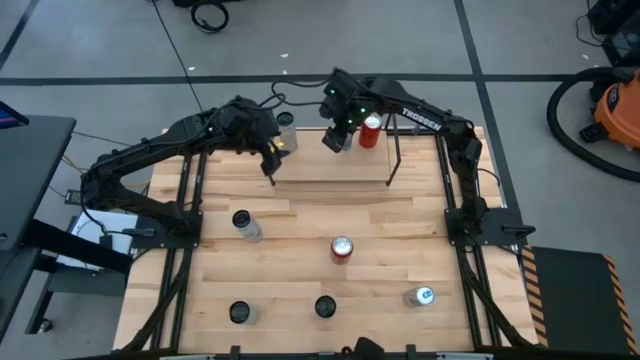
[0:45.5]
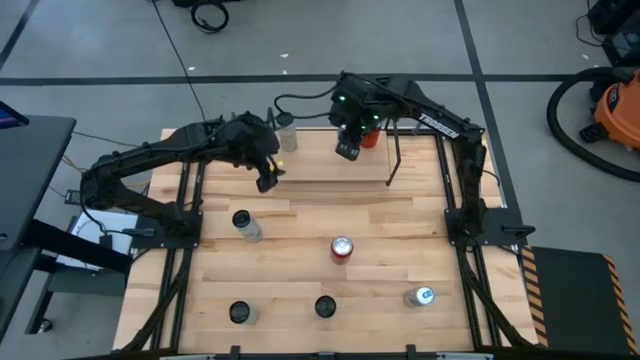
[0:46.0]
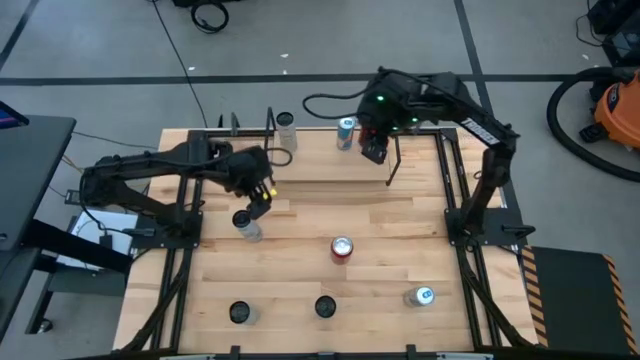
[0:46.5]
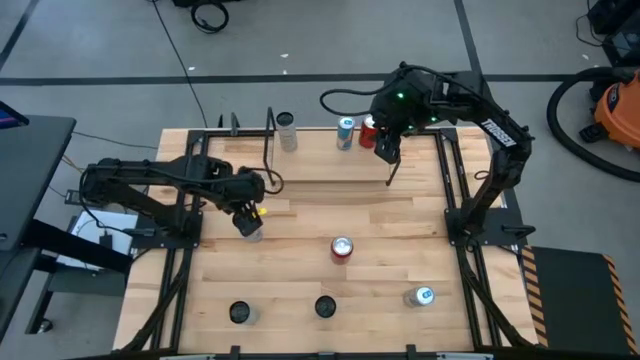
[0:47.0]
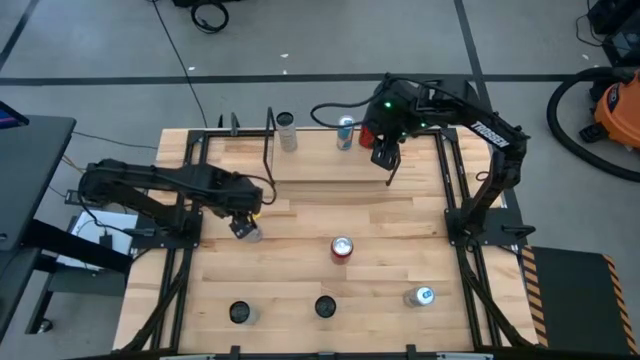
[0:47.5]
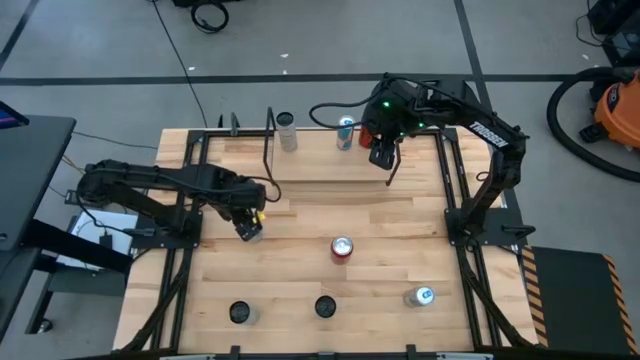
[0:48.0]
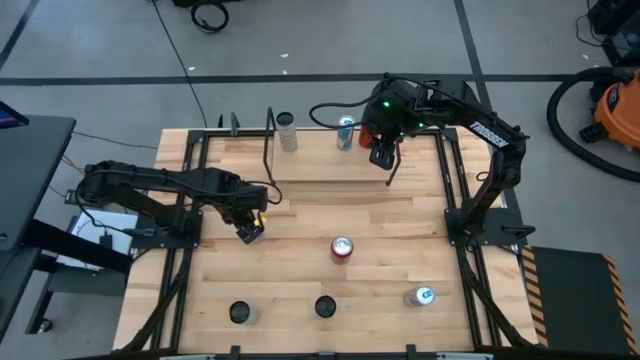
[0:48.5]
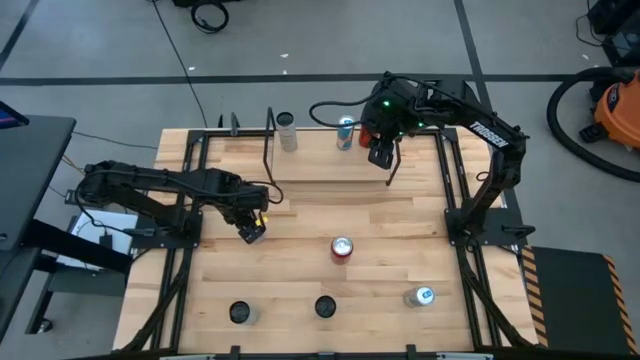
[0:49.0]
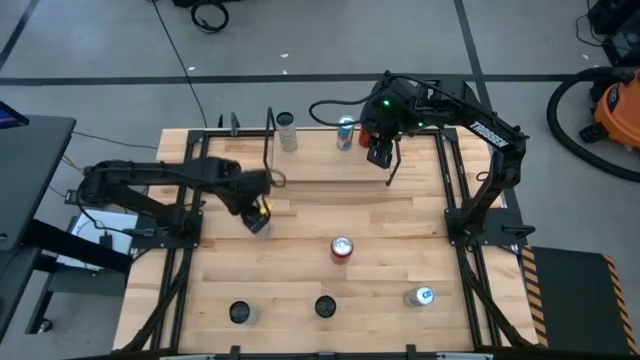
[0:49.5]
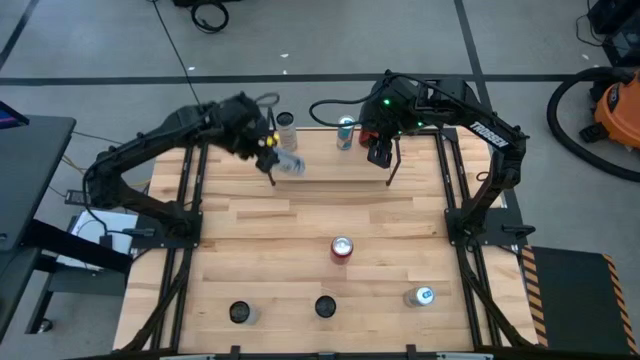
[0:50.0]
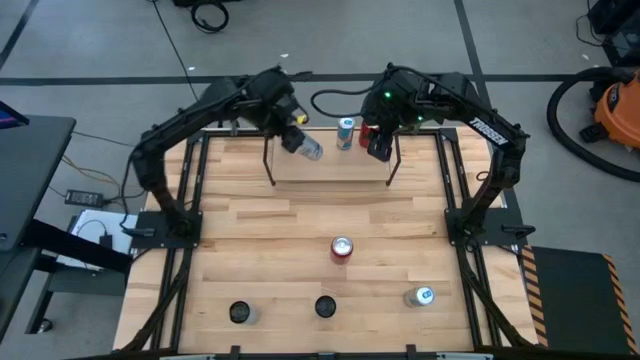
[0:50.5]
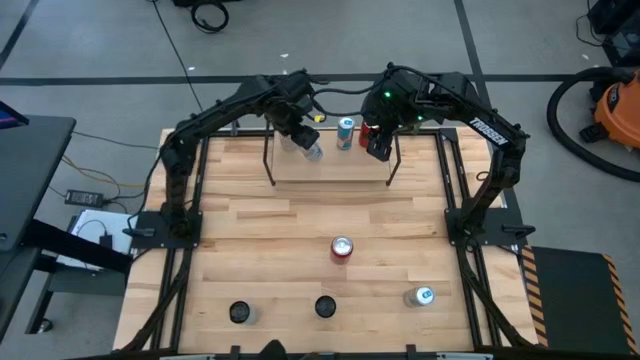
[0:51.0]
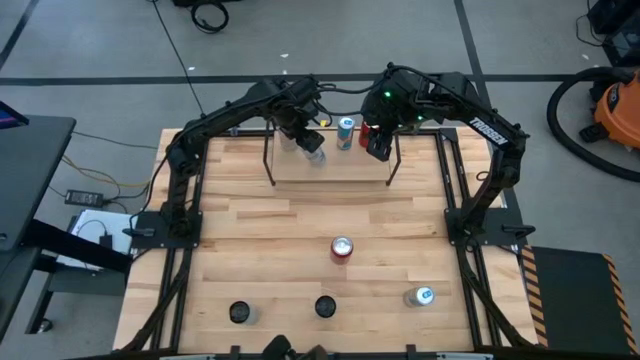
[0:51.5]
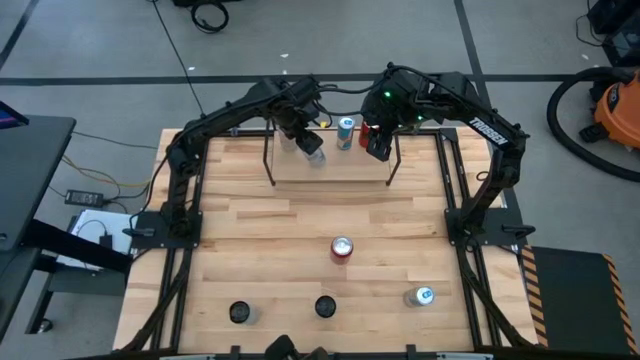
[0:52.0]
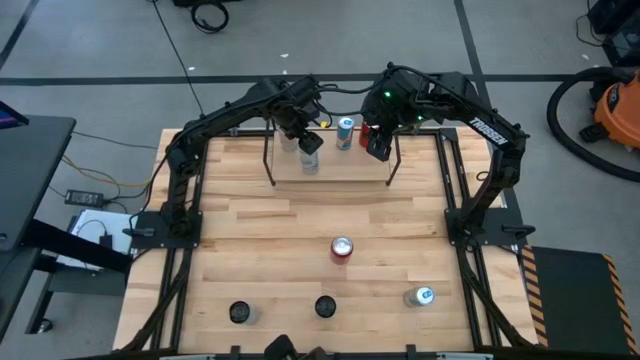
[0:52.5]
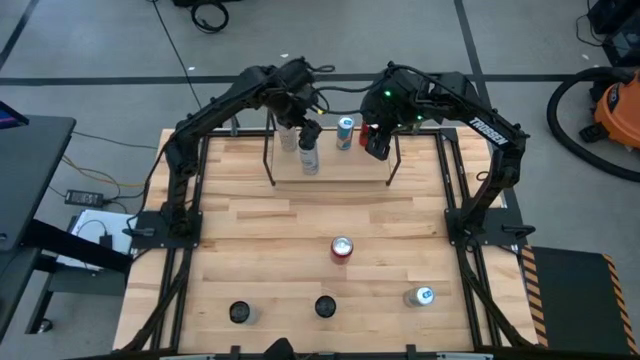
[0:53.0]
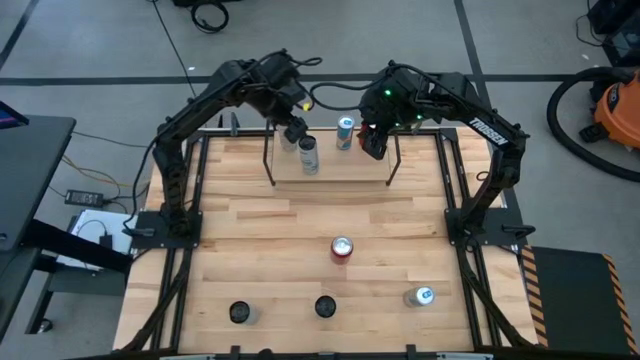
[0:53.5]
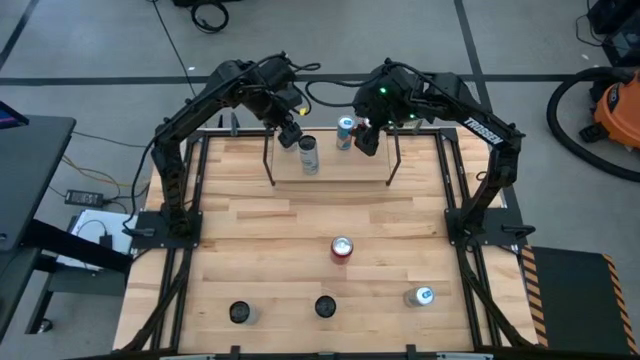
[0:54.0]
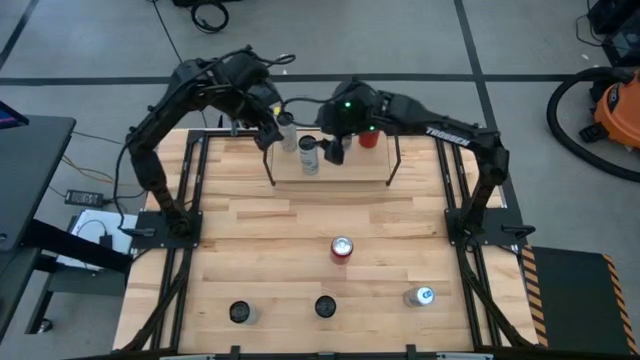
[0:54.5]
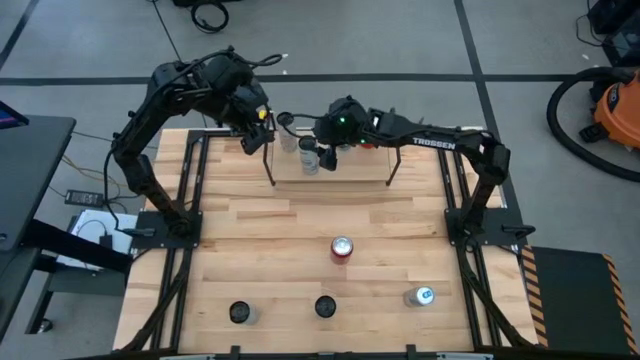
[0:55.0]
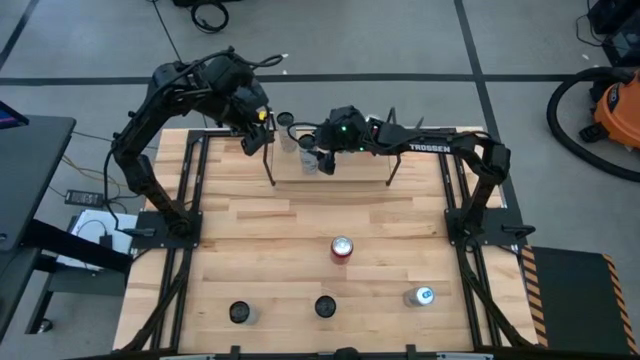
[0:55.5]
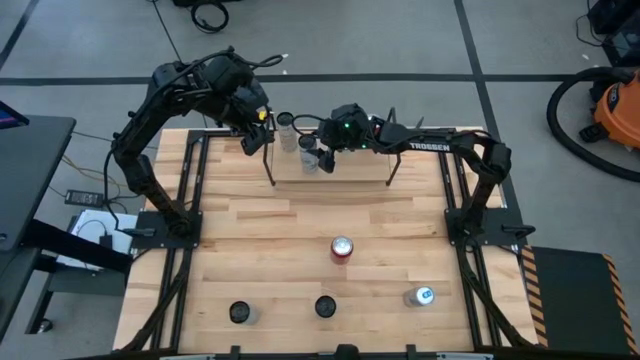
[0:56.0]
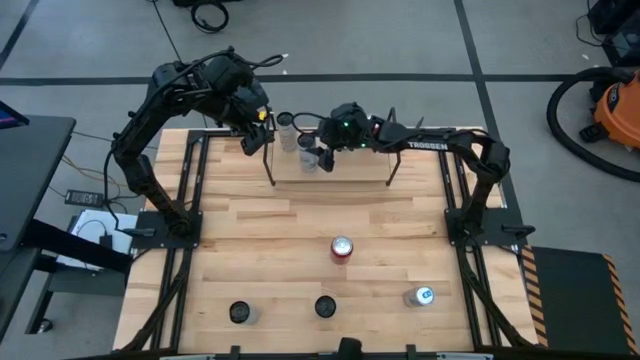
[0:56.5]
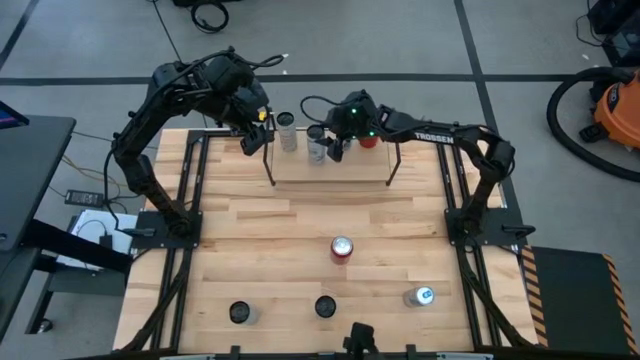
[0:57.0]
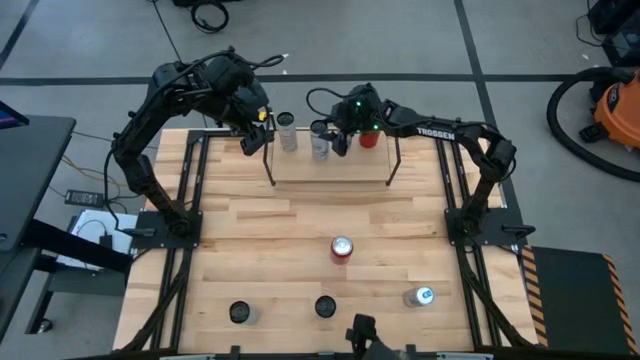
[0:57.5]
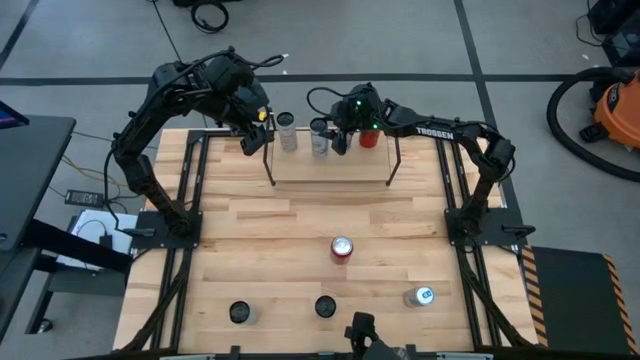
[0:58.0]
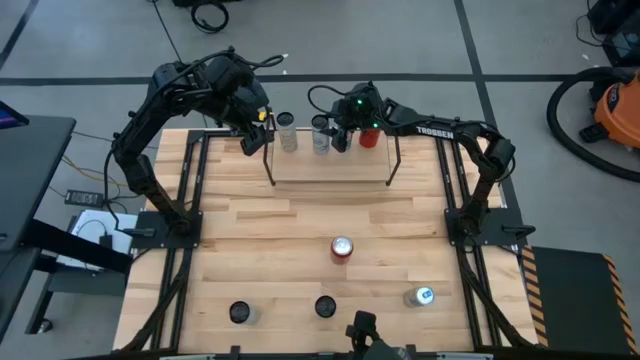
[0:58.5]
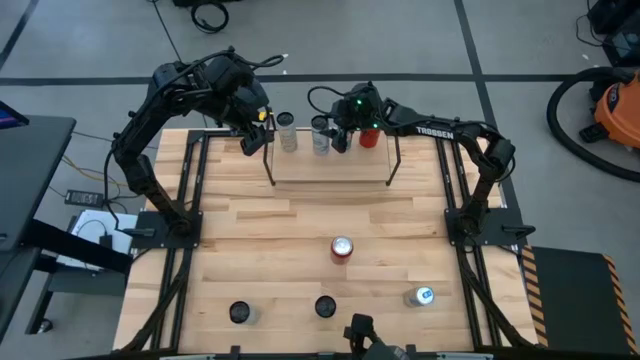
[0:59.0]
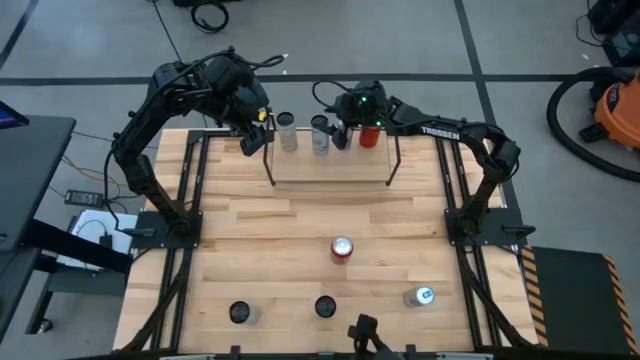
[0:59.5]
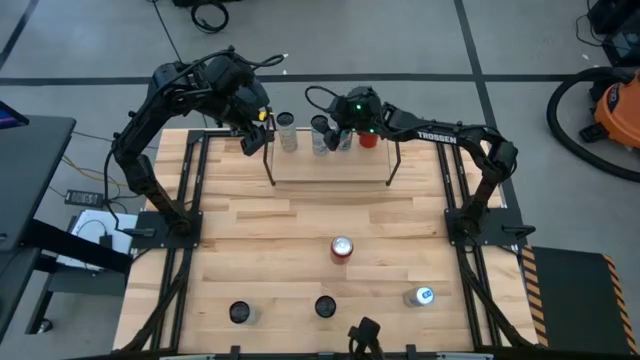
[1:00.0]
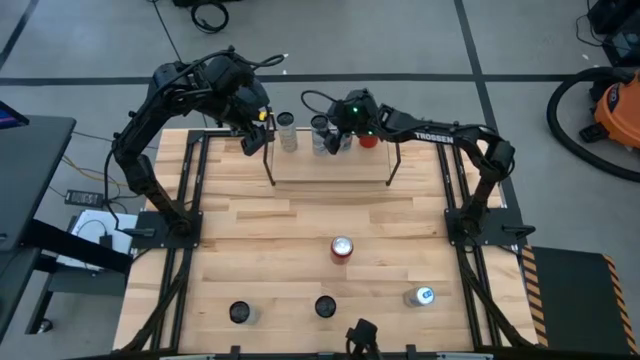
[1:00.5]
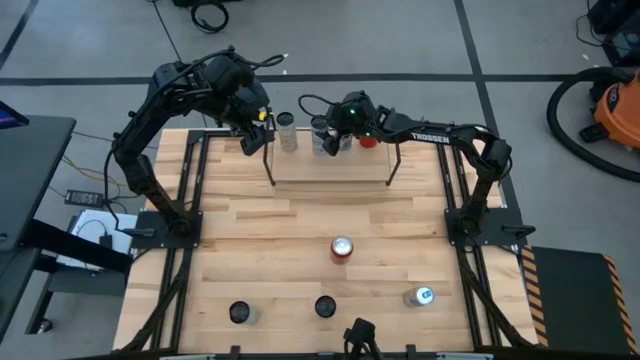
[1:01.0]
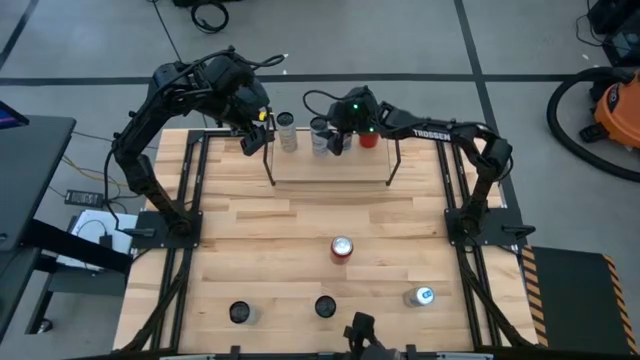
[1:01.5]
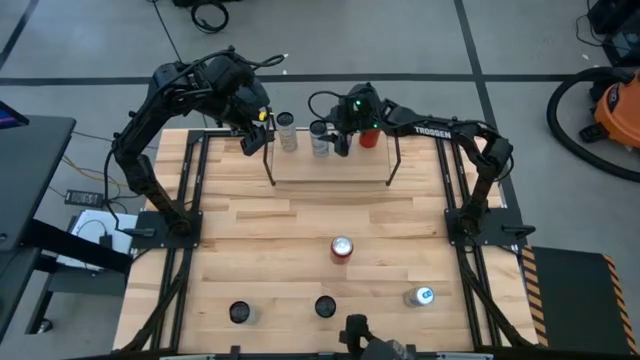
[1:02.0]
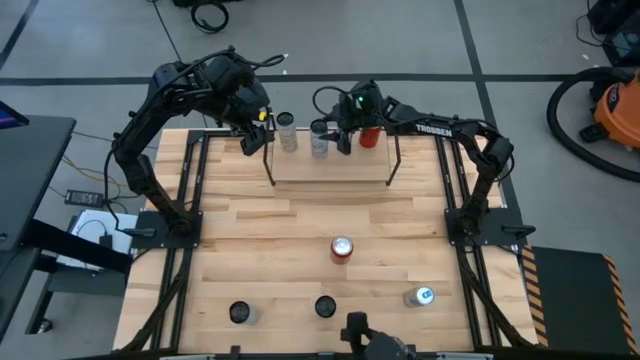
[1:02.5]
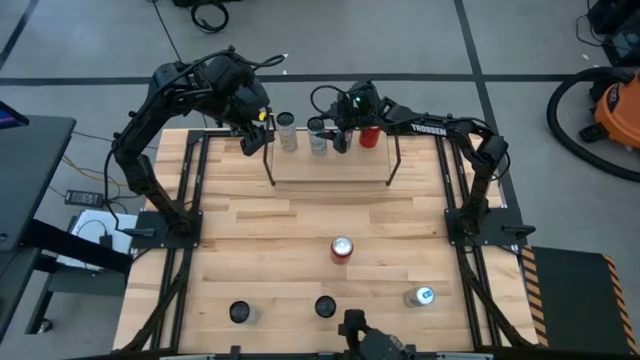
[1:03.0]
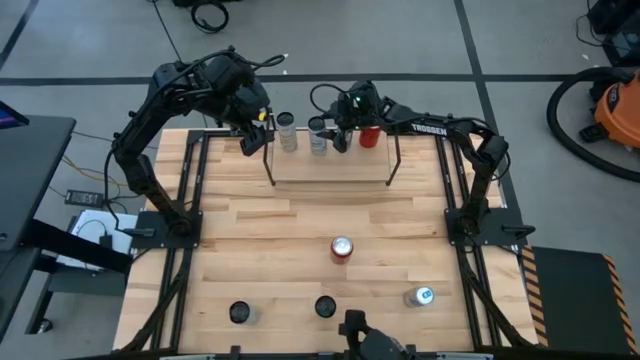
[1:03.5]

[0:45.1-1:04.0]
Task: Place canned beverage on shelf
Put the top white blue soda can on the shelf

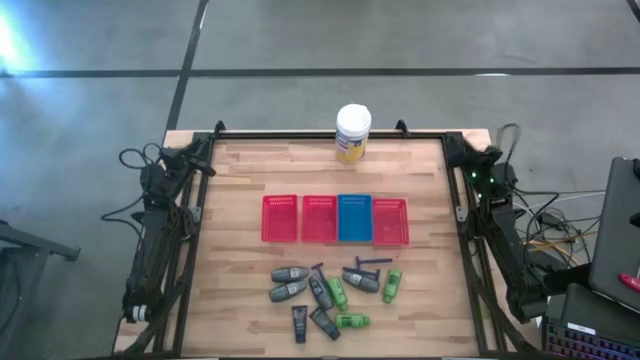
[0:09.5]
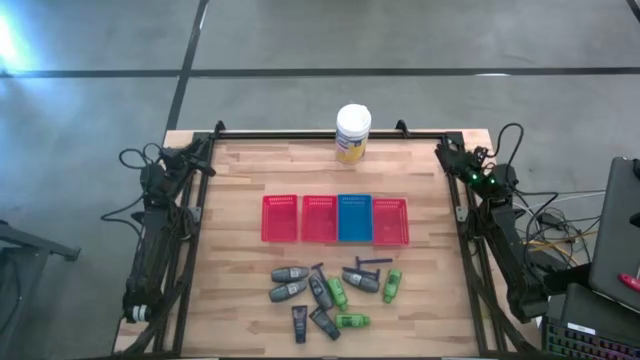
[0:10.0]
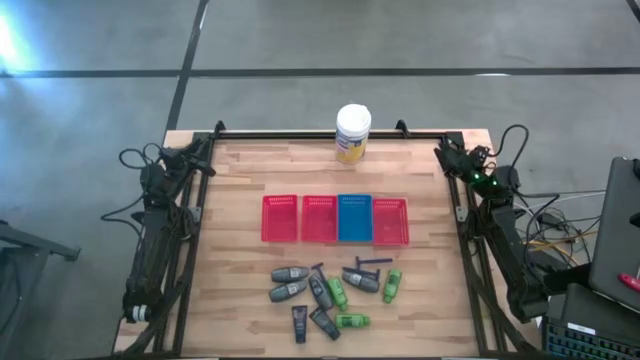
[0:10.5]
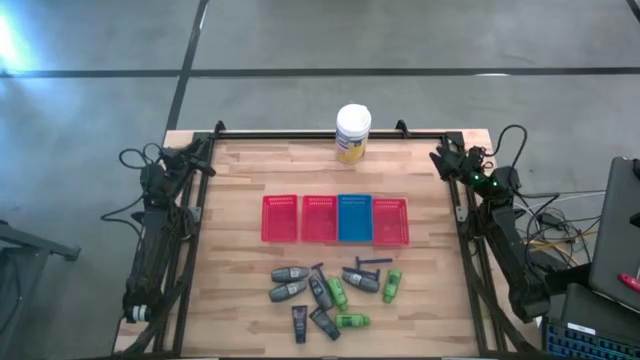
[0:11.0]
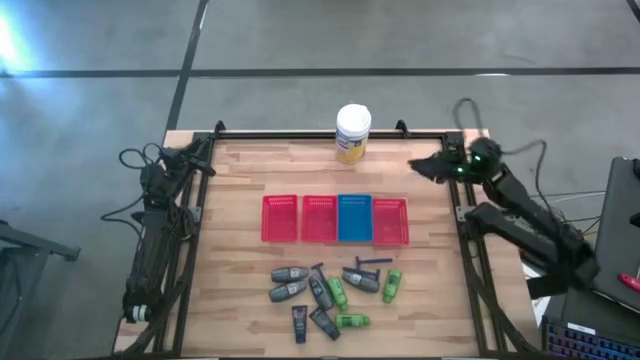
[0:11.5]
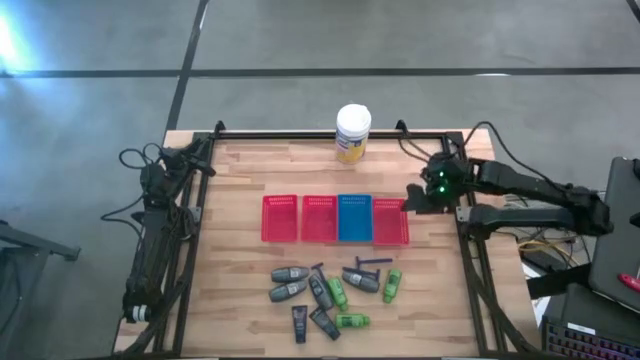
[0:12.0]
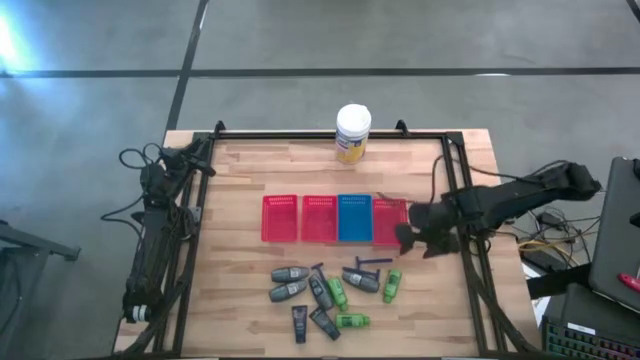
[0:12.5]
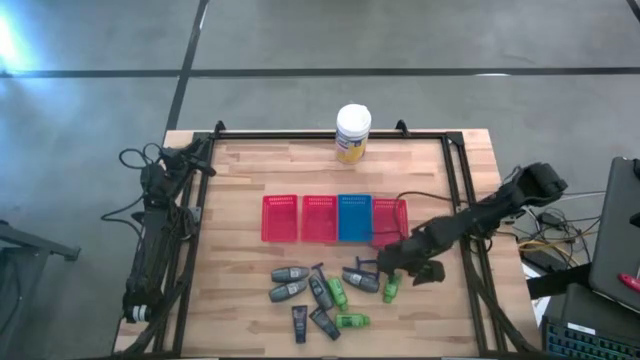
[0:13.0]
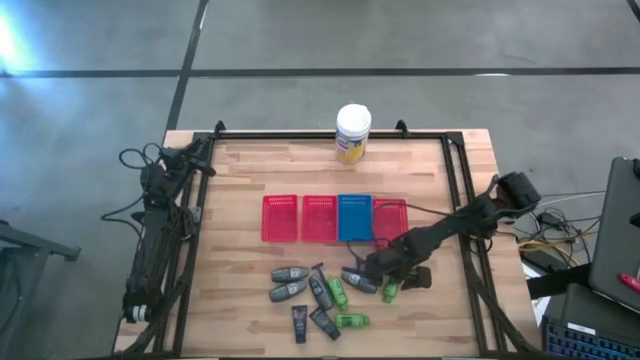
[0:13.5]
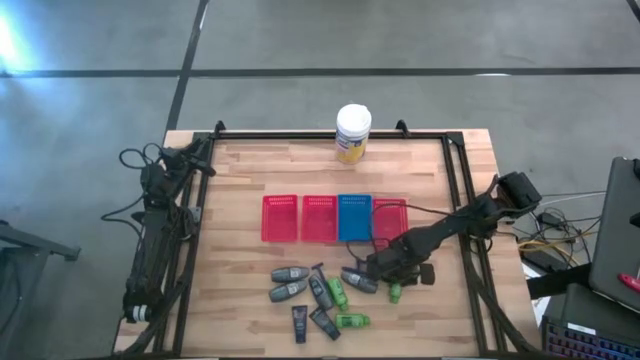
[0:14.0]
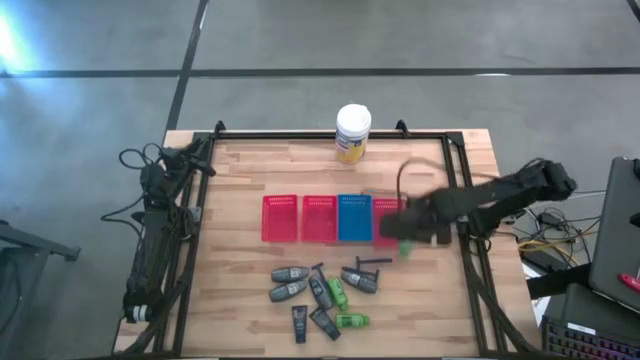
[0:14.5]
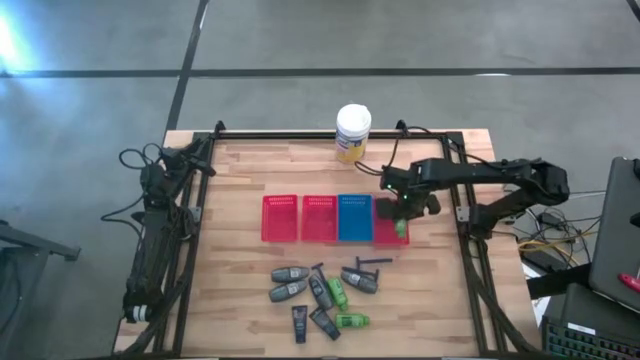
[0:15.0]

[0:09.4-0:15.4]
Task: Pick & Place Travel size toiletries
Put the green shampoo into the right red bin
